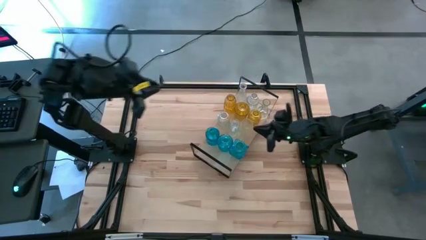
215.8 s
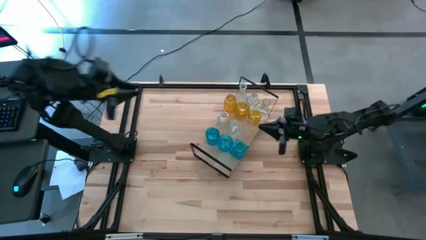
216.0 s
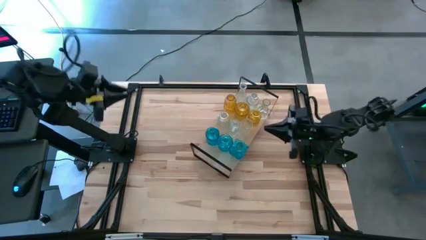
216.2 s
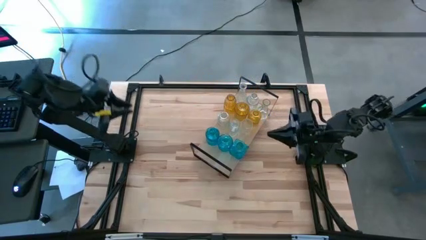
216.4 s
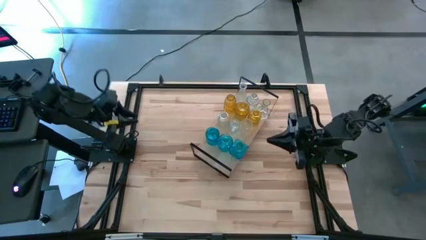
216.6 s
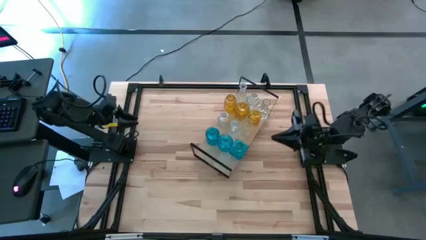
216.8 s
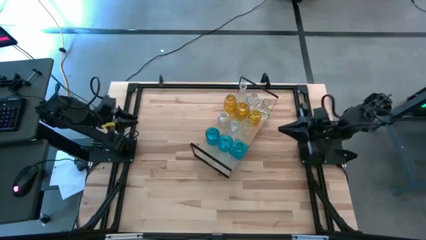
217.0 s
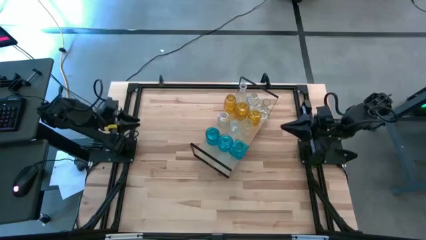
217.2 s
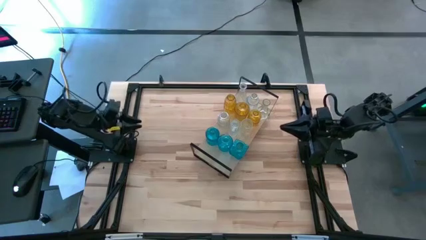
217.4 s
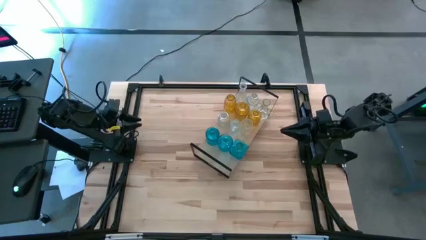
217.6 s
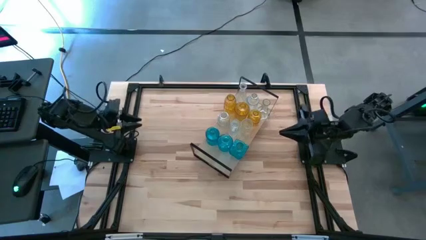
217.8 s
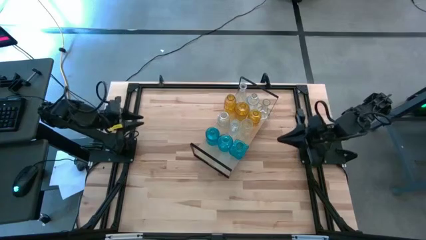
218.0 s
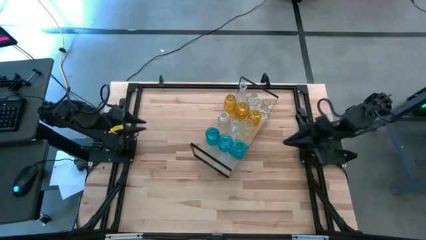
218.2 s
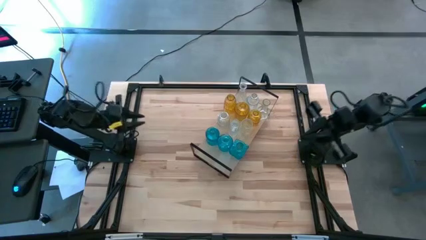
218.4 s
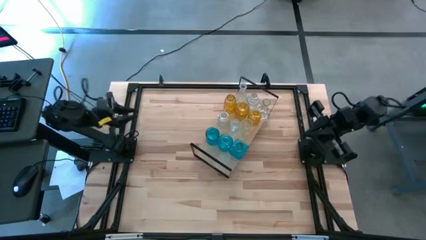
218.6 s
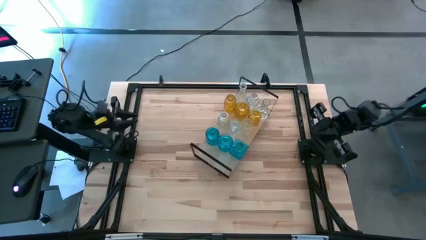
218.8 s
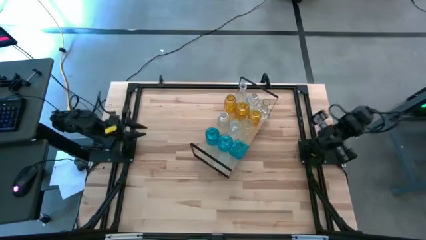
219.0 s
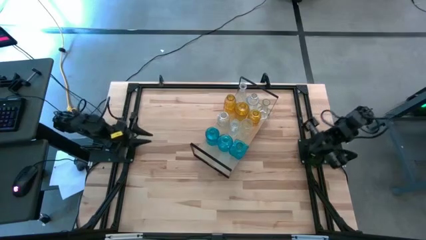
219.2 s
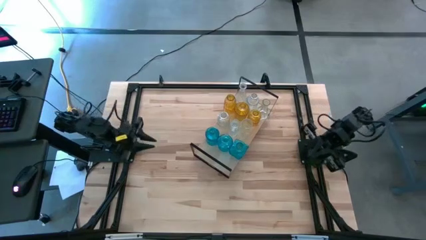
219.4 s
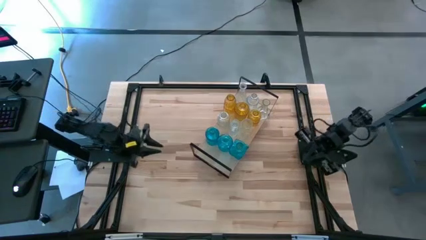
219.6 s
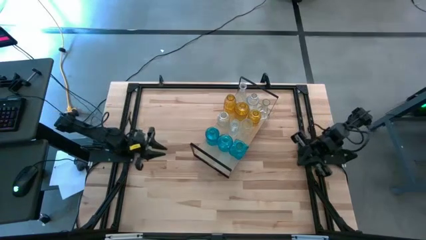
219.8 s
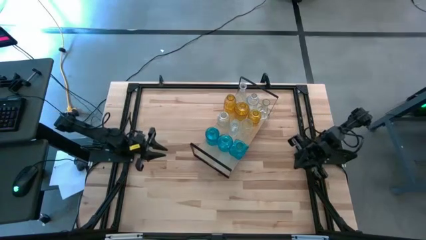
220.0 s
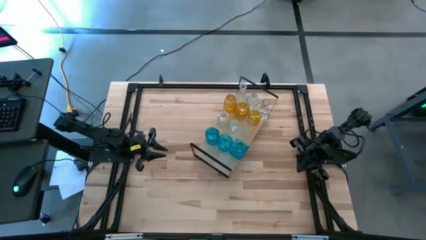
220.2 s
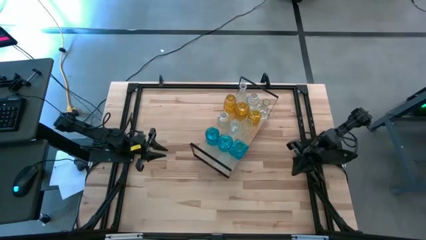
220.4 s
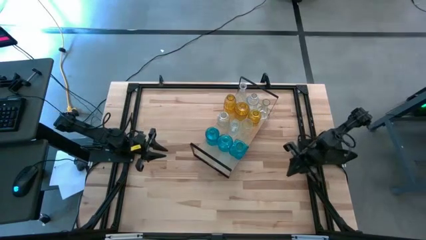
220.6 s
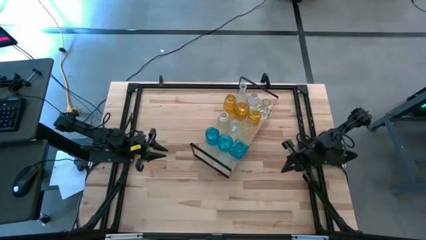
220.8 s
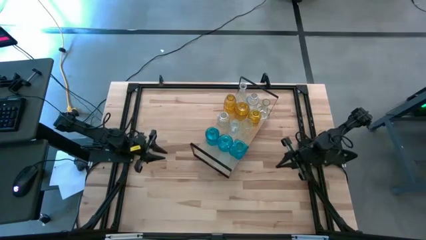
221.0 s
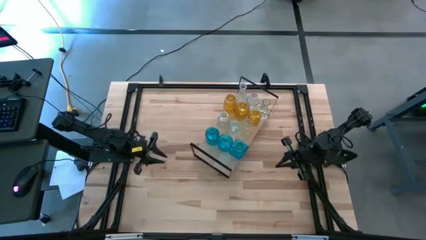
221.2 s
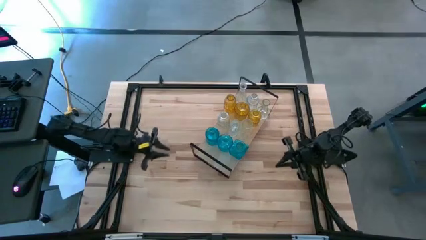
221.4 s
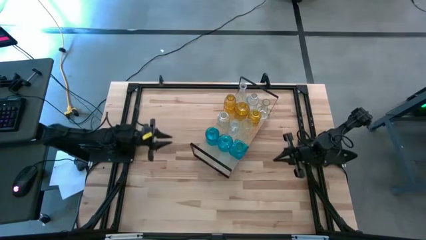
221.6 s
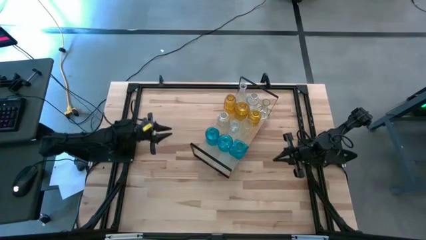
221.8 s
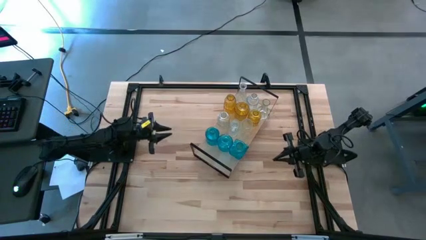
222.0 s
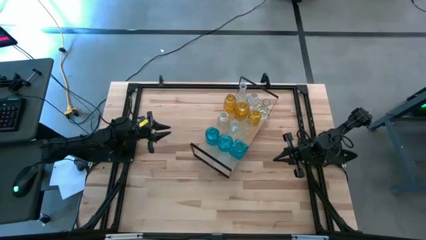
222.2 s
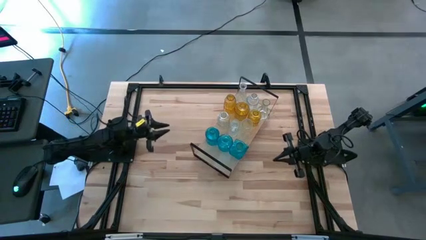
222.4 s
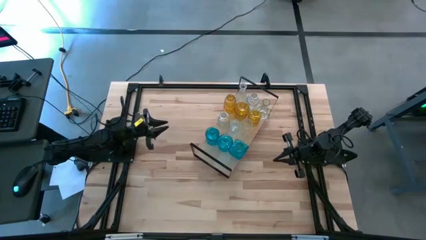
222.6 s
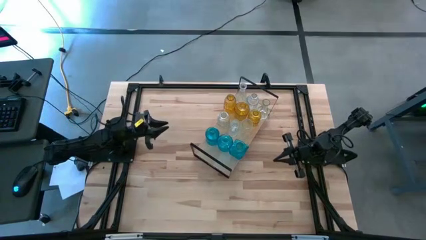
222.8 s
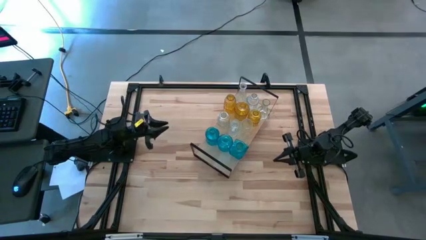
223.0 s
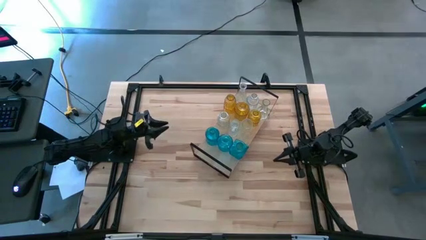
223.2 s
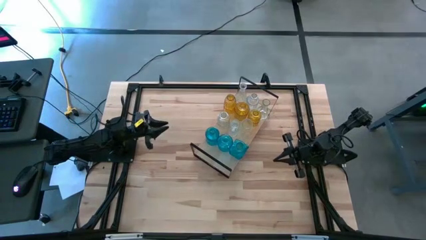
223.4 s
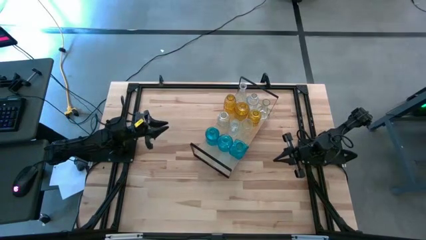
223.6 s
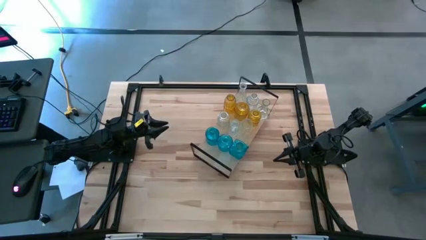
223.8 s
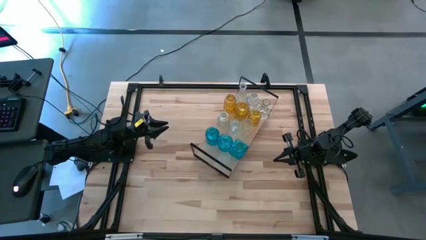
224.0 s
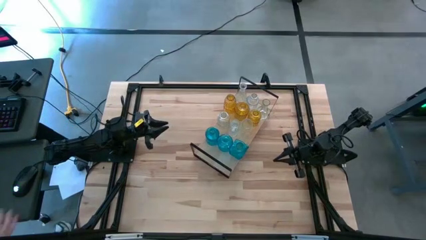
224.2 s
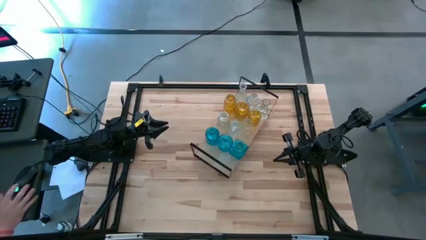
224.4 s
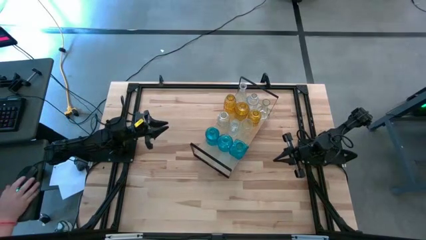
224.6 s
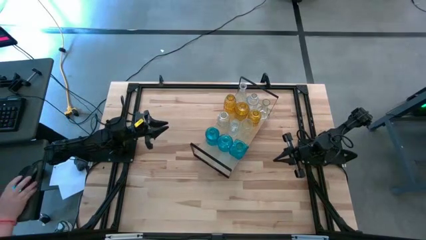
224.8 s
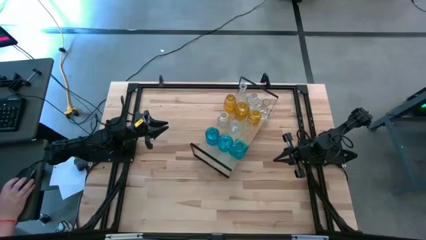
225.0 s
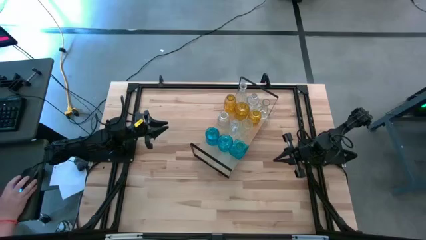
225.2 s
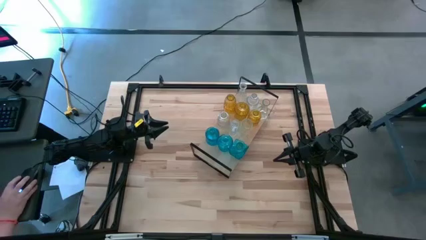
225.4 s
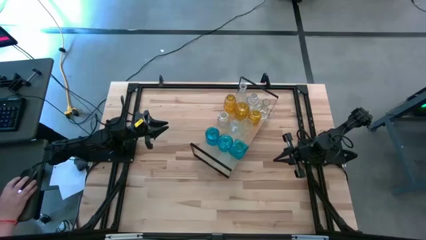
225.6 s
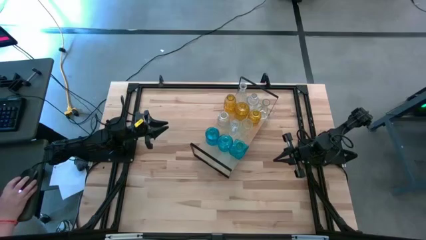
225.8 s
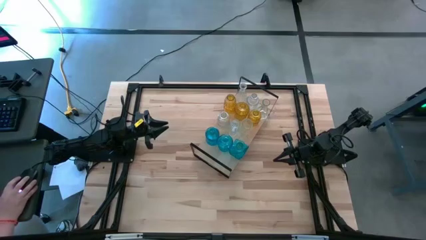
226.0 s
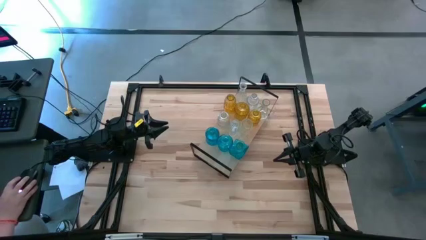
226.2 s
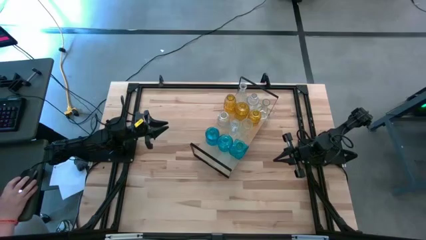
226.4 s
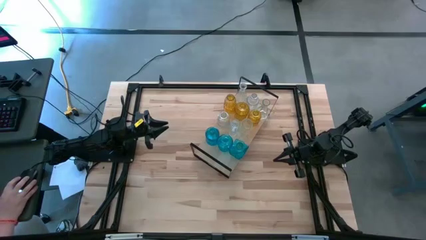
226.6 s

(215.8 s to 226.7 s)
Task: sort vases onto shelf
Return to Home Position

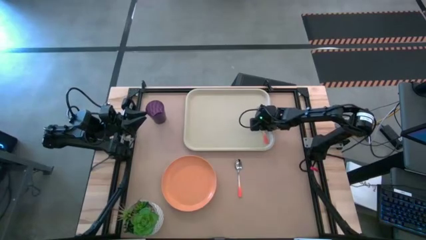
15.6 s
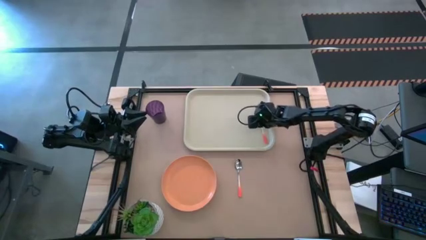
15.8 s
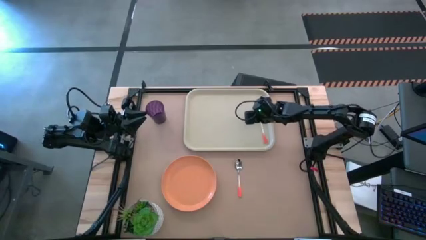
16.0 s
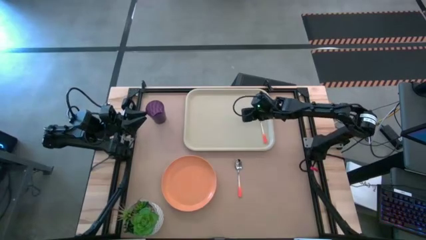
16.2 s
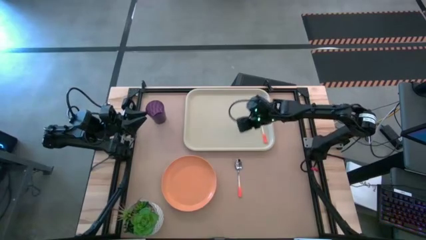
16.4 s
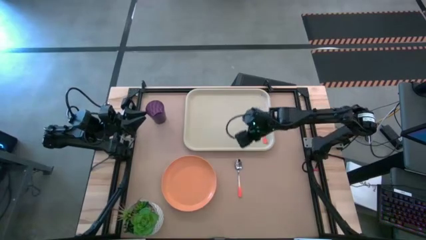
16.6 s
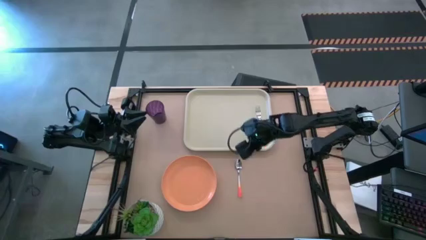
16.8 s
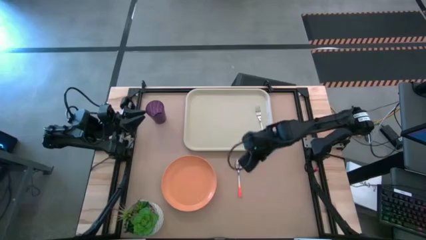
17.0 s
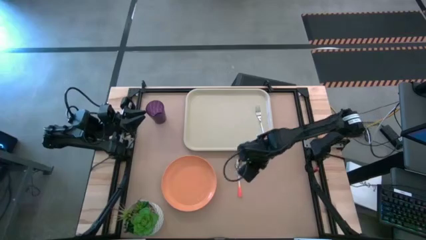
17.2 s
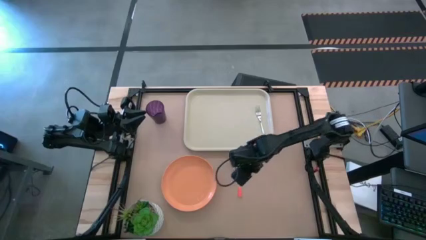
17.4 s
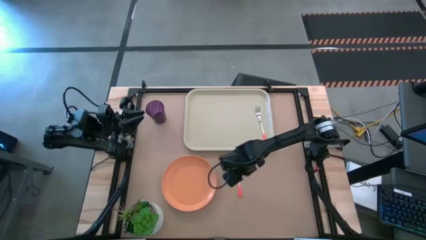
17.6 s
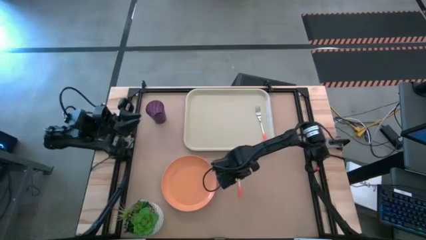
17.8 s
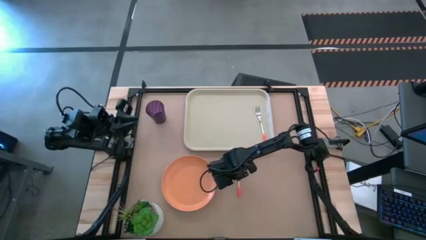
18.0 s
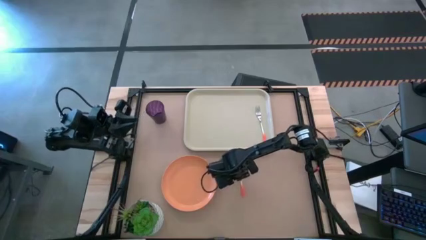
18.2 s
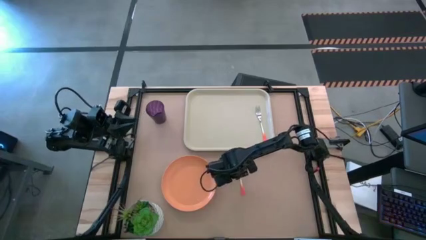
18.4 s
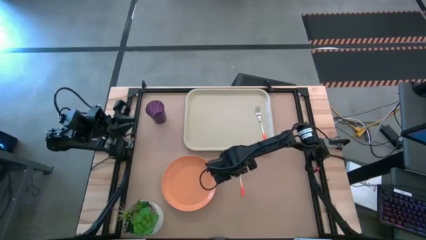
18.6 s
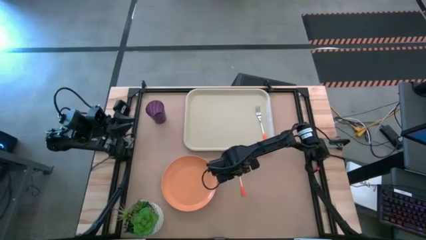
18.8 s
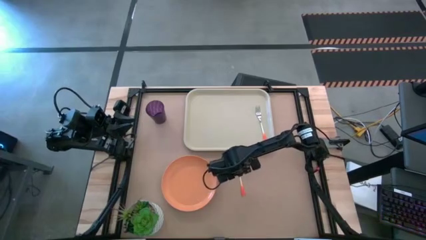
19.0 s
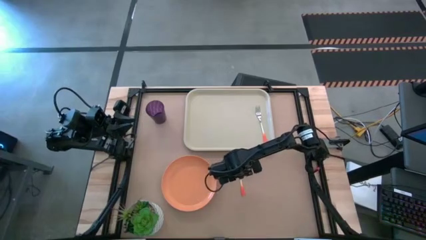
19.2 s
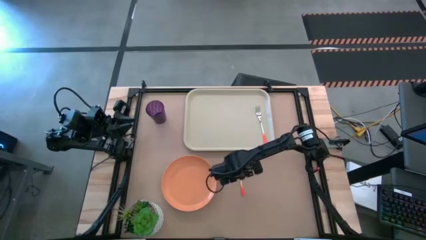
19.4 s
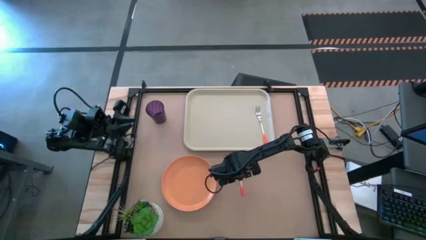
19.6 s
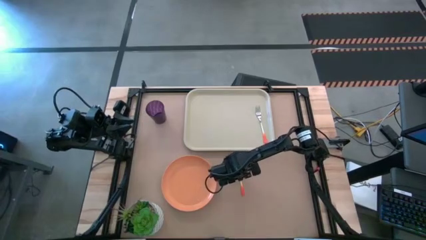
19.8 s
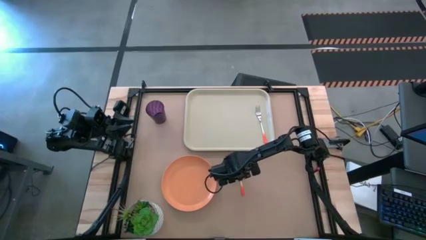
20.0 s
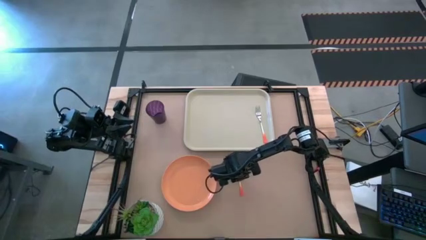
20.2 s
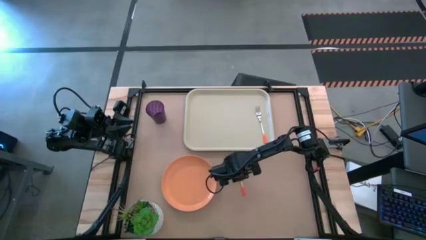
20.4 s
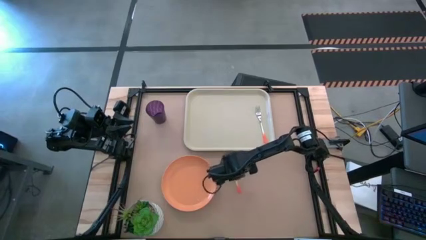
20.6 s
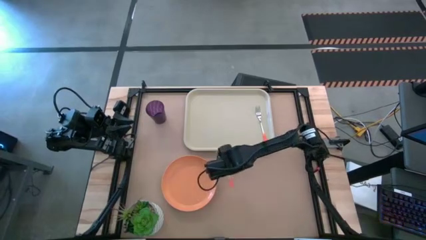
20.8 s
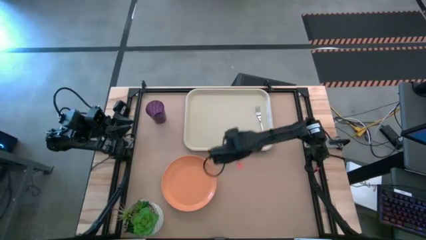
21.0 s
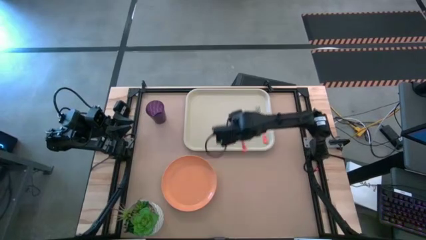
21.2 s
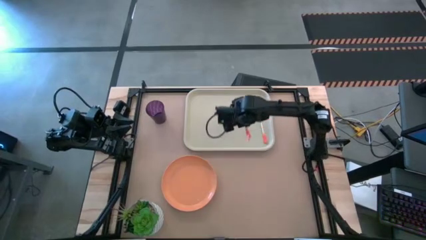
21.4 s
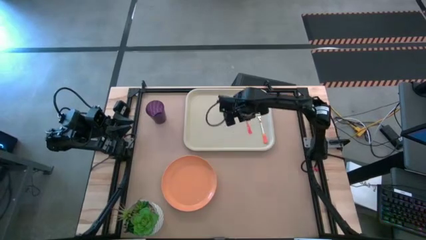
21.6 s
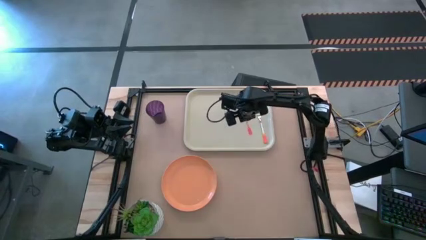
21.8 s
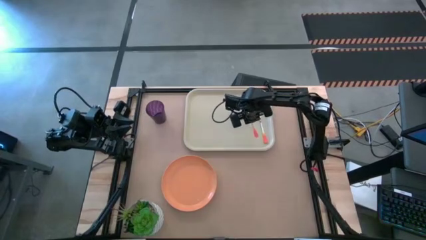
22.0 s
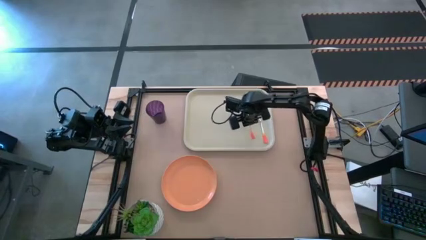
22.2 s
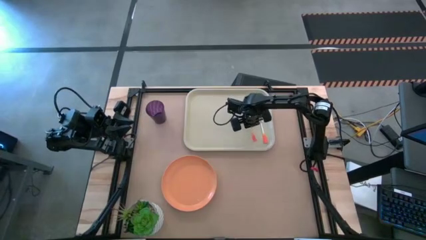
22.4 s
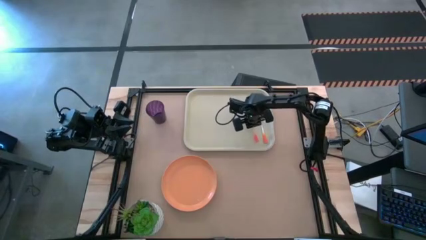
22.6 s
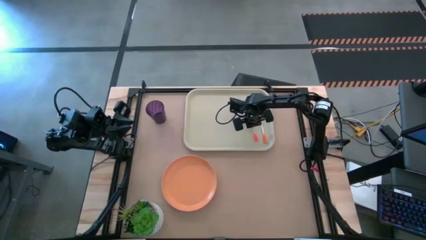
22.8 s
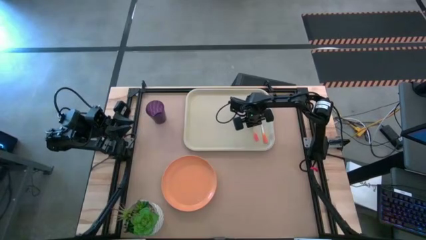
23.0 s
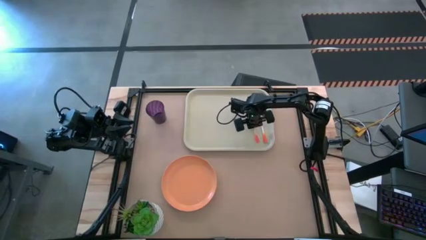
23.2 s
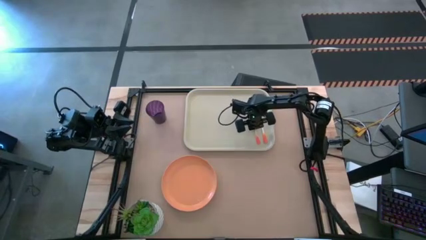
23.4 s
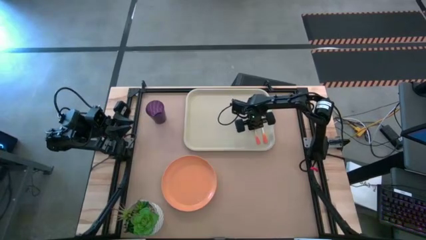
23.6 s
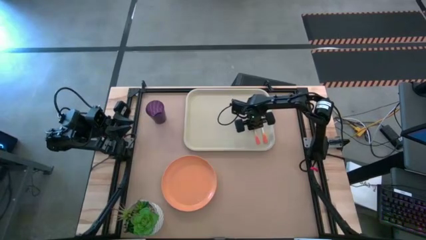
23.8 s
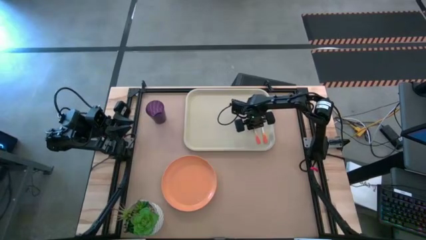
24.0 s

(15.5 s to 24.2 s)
Task: Pick and place plate/cup/fork/spoon on tray
Put the orange spoon to the left of the orange fork on the white tray
